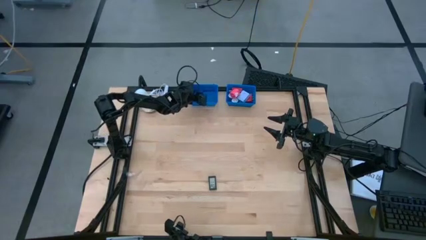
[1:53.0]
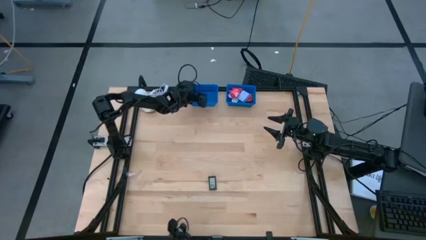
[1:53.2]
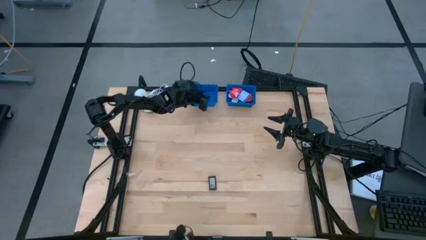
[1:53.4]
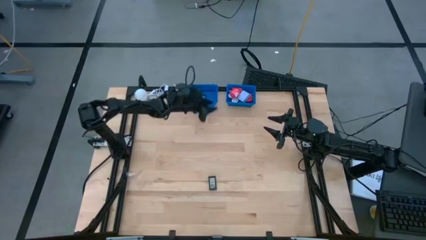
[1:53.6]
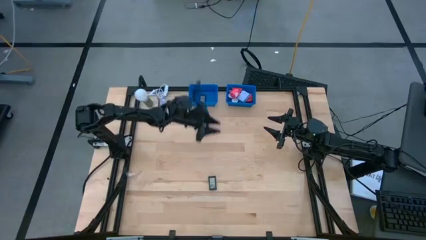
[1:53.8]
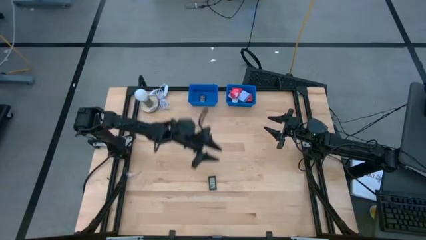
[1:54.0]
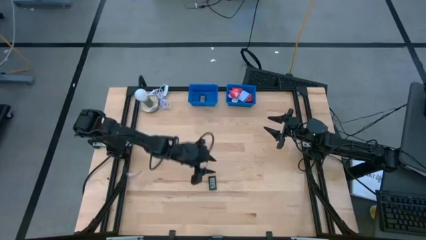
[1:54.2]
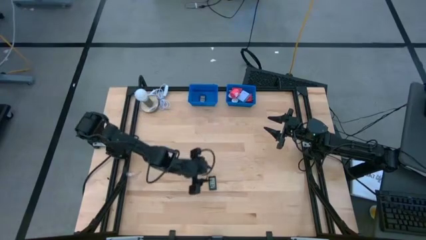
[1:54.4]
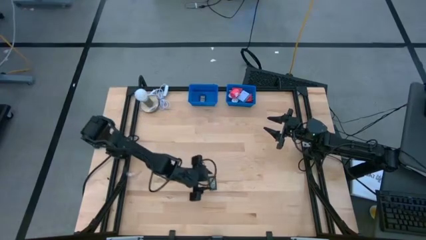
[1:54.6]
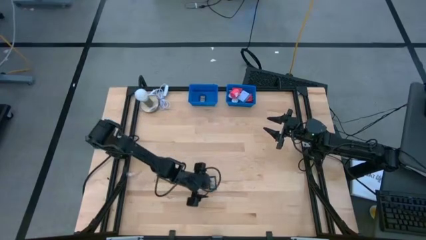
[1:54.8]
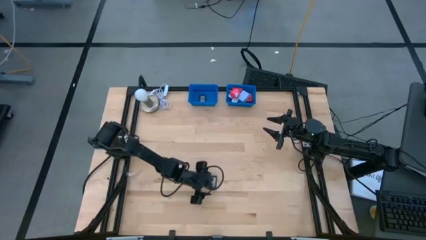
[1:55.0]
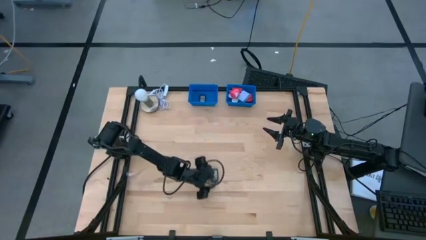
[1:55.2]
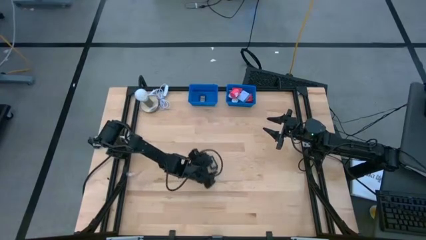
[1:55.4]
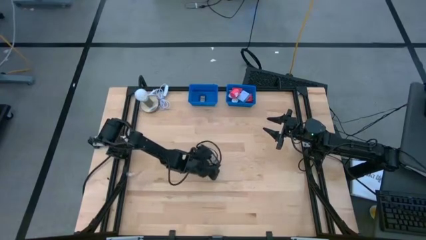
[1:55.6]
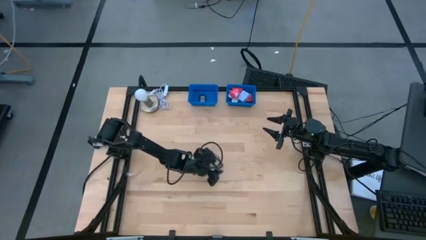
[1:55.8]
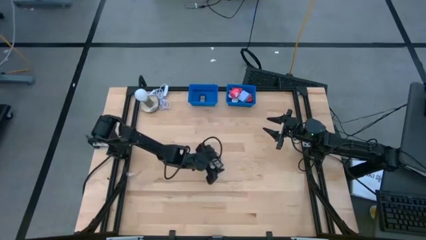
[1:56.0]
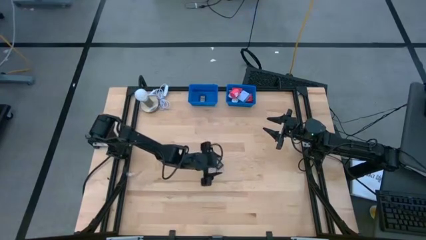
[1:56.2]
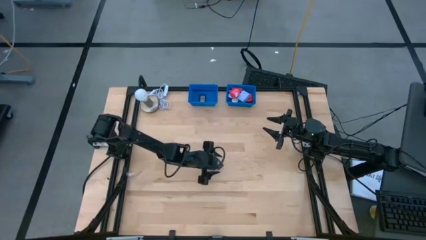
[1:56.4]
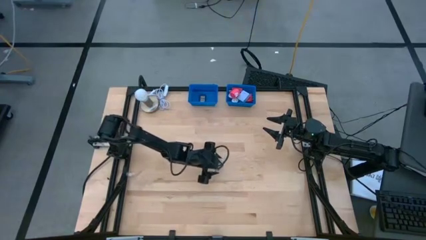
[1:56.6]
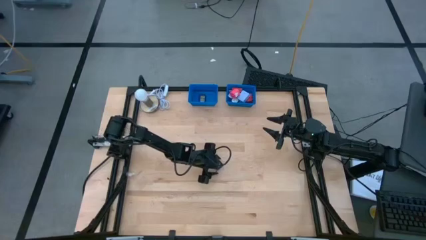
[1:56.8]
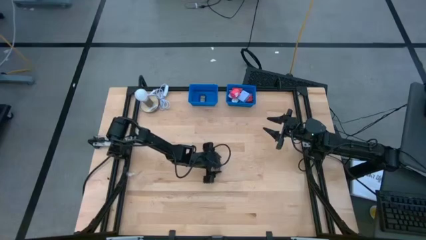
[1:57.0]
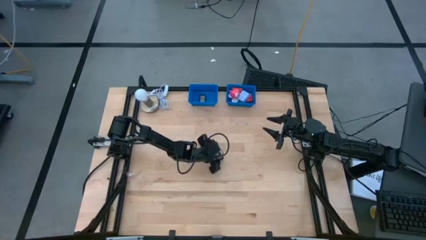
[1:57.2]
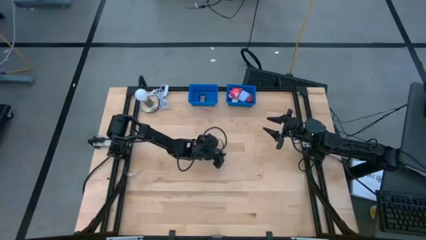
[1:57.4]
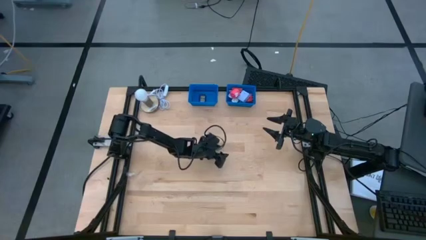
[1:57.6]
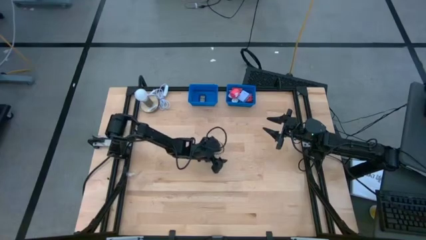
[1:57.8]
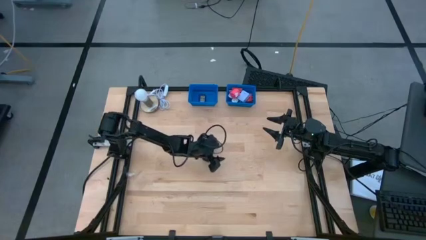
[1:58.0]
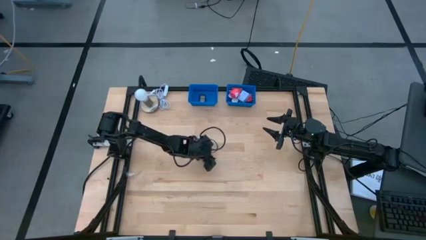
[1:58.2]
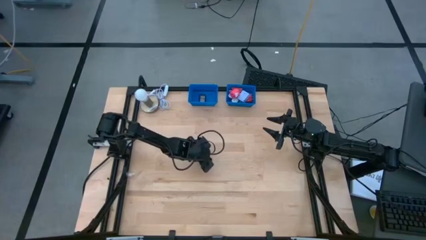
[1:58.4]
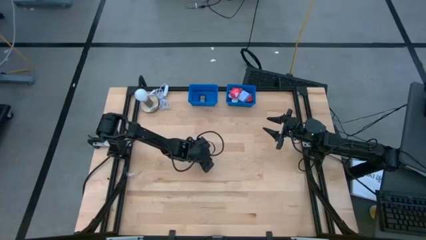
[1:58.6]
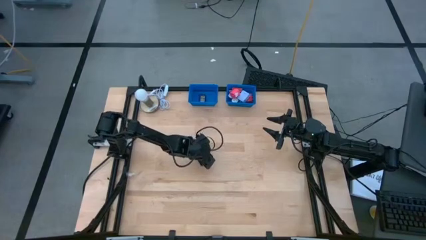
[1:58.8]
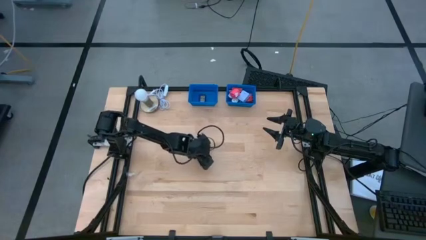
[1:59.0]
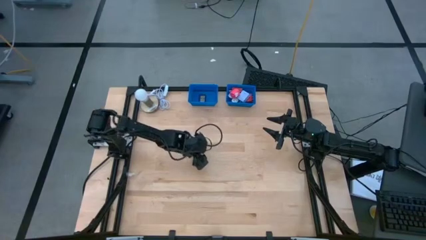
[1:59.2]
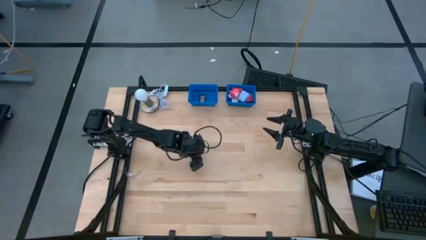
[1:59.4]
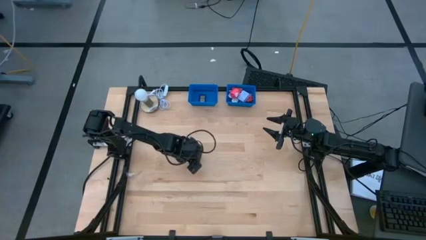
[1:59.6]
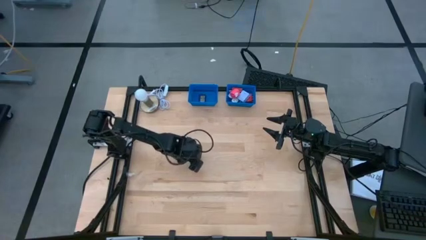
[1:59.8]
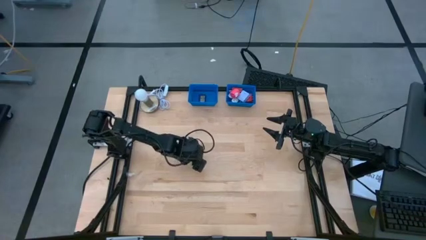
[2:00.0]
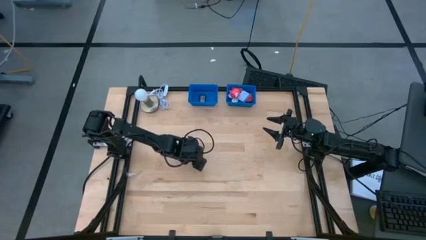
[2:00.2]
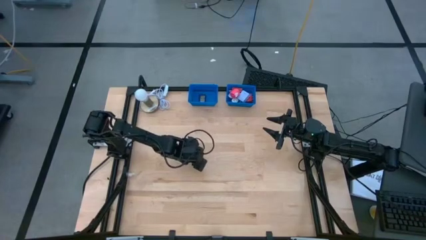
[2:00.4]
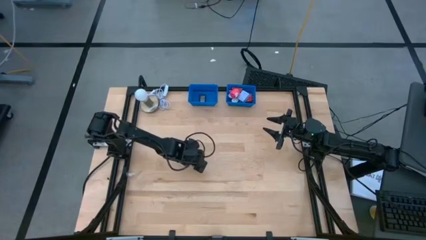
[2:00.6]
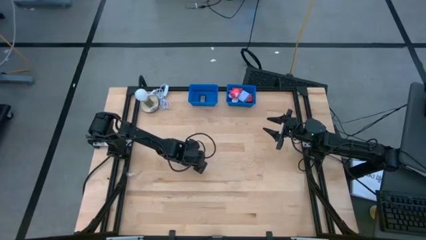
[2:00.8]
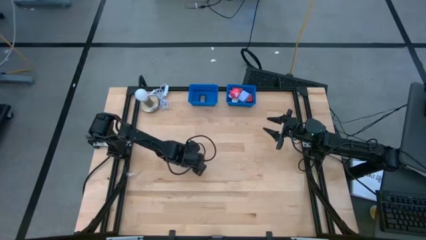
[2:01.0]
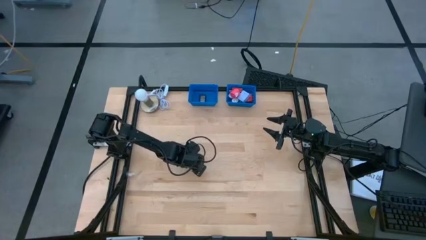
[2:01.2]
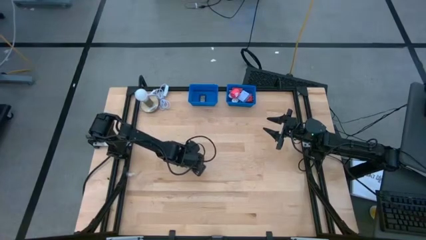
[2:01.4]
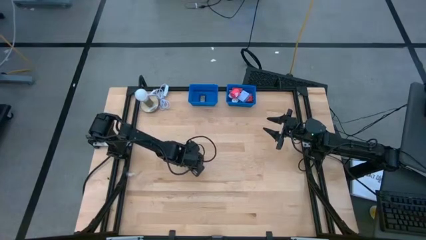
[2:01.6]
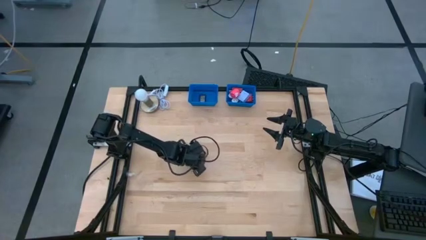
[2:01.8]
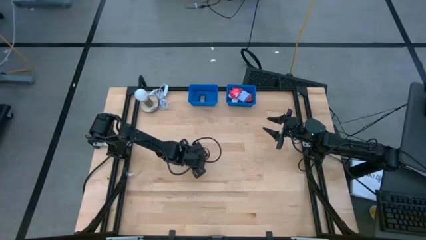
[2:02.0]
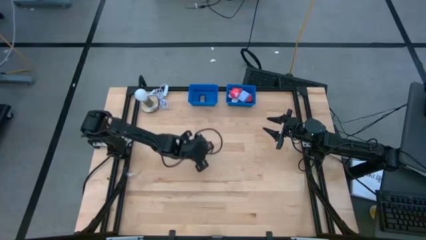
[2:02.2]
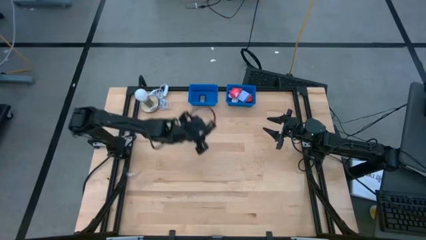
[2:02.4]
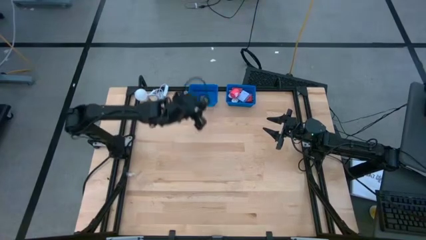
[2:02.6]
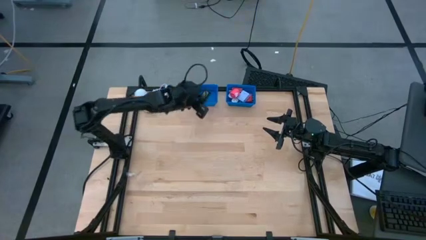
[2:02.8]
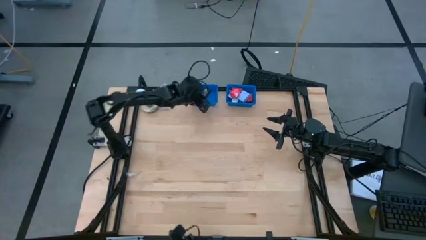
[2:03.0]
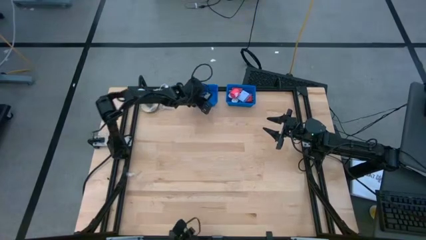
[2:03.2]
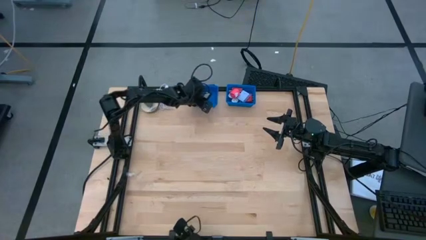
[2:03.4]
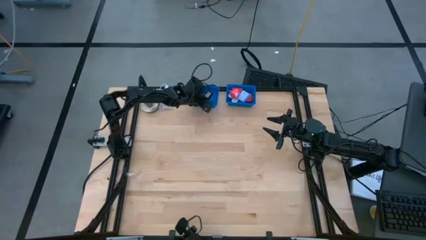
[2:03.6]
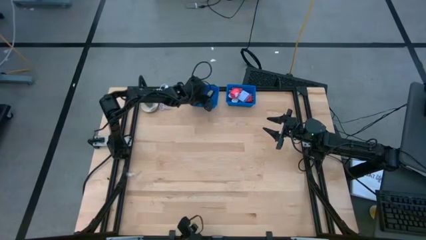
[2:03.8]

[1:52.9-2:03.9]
Task: Pick & Place Office items
Put the black digital timer into the left blue bin

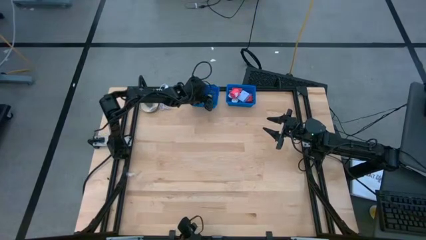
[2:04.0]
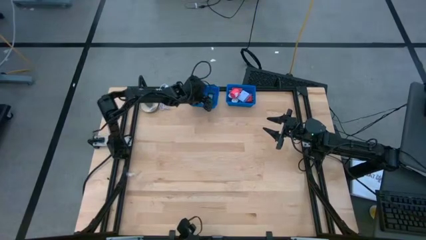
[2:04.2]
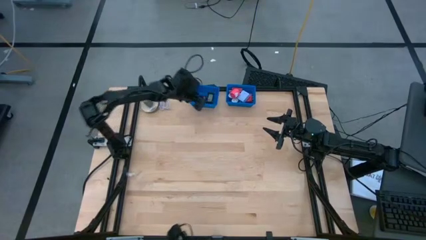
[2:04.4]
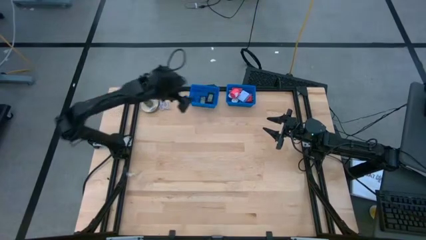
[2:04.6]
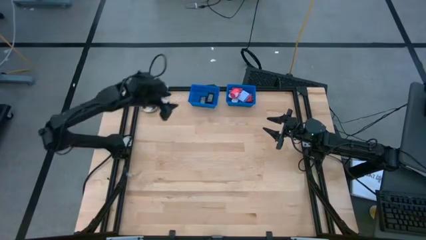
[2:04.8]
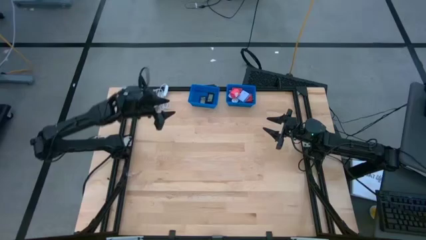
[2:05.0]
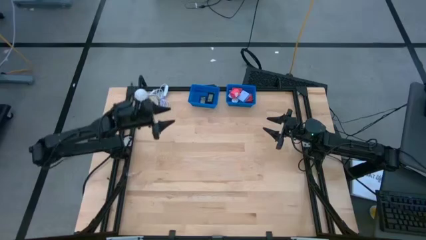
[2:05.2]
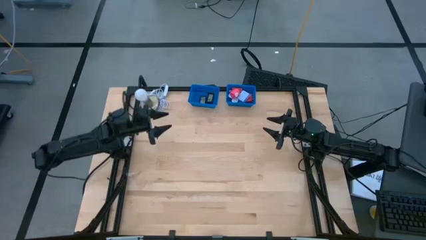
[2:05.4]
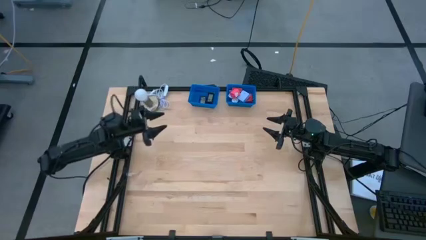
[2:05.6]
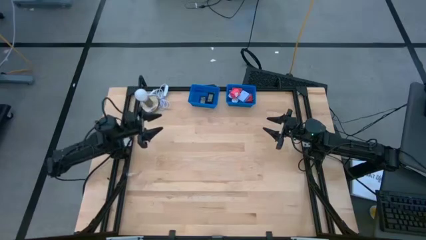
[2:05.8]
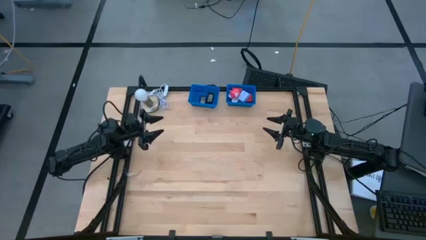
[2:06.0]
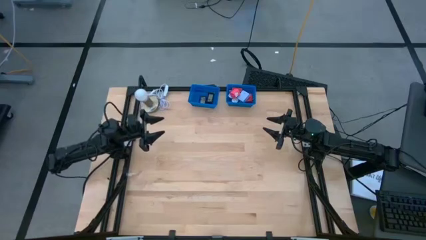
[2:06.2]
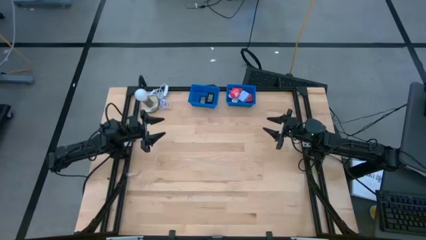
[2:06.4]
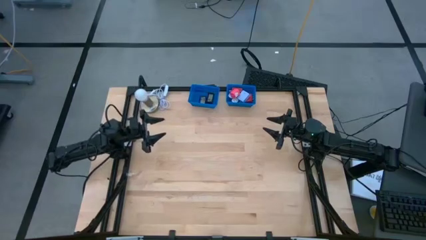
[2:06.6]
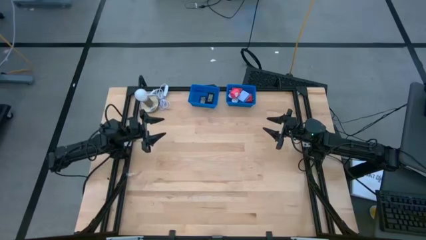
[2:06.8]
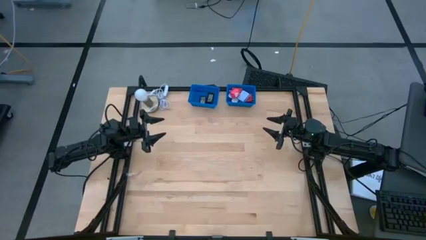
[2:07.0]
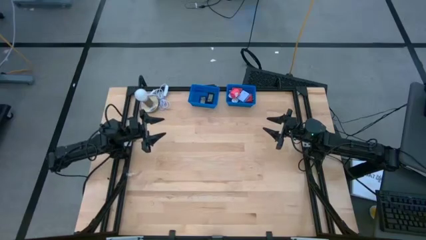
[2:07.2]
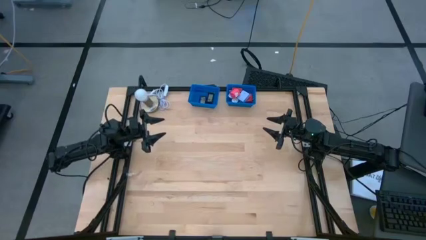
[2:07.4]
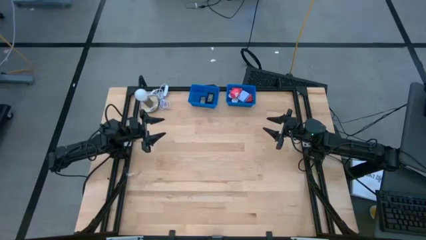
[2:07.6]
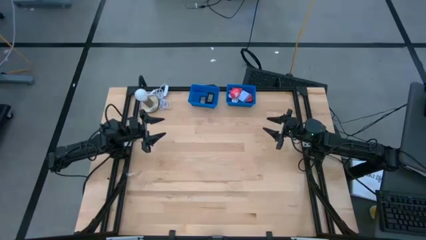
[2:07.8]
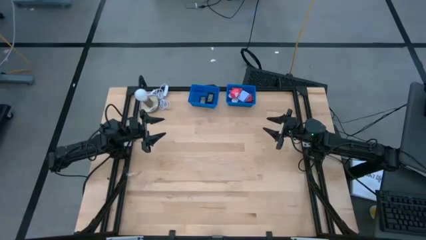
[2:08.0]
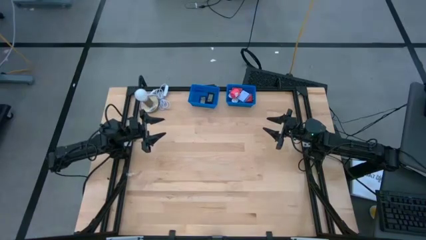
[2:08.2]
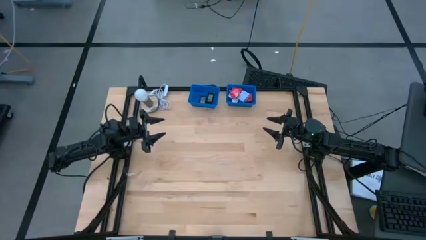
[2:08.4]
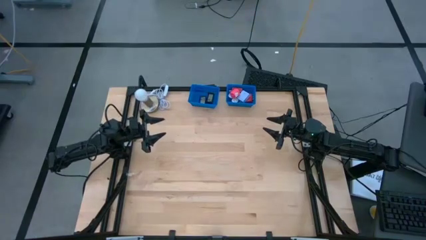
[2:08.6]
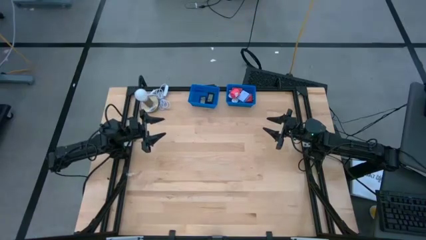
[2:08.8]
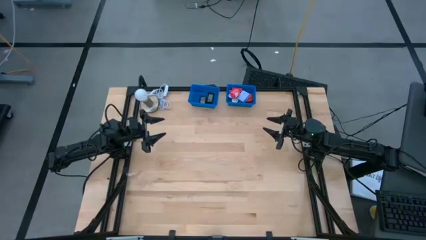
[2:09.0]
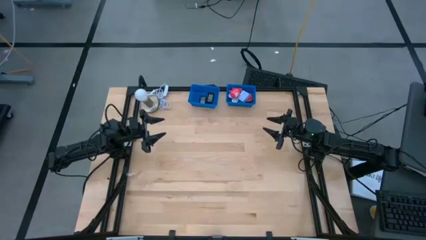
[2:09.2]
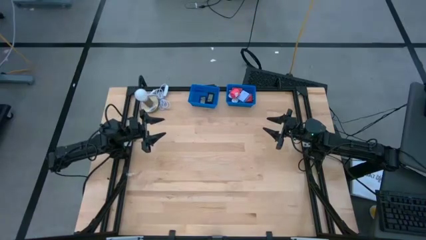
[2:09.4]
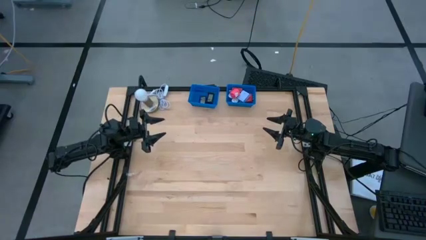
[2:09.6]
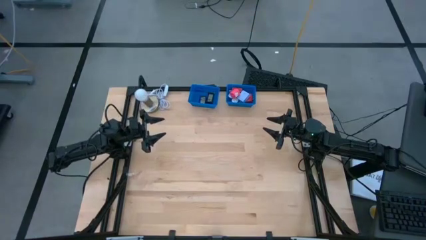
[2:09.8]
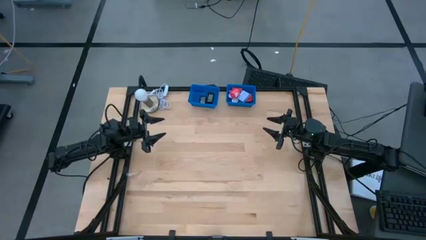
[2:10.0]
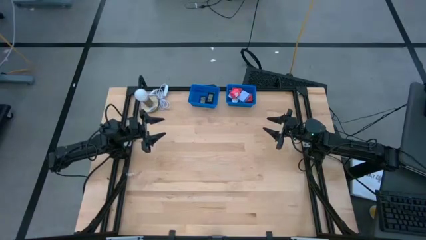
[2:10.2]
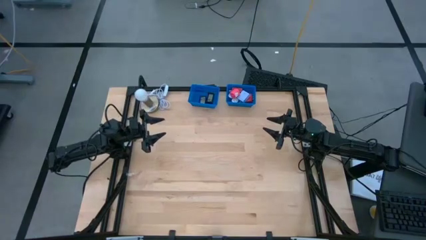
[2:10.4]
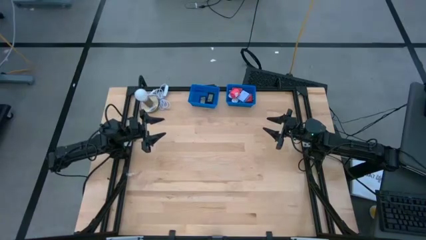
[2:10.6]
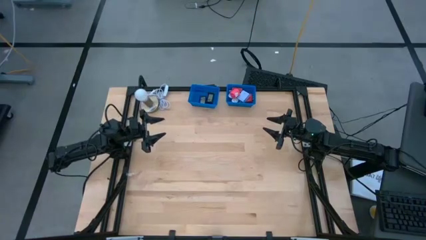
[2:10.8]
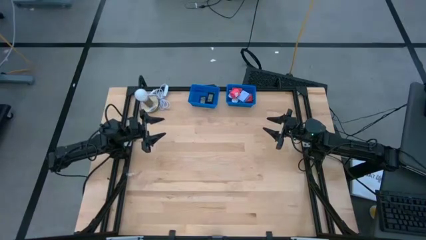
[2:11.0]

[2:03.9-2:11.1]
Return to Home Position
